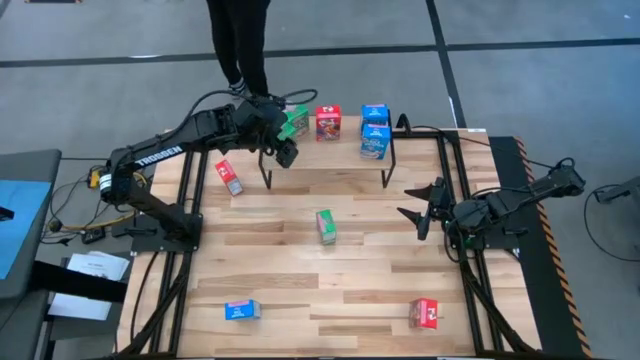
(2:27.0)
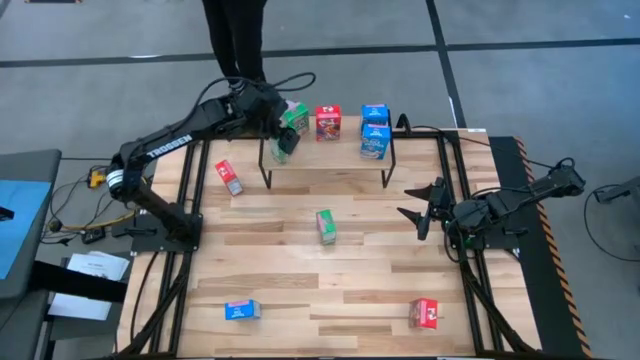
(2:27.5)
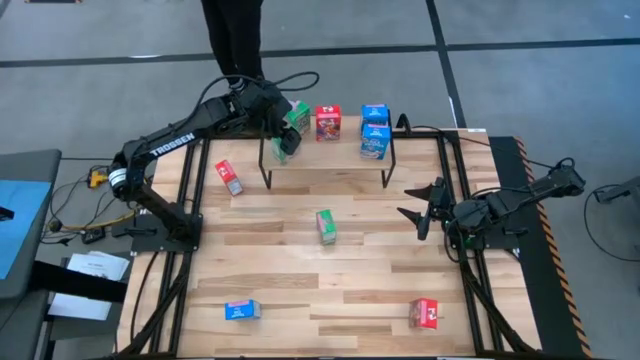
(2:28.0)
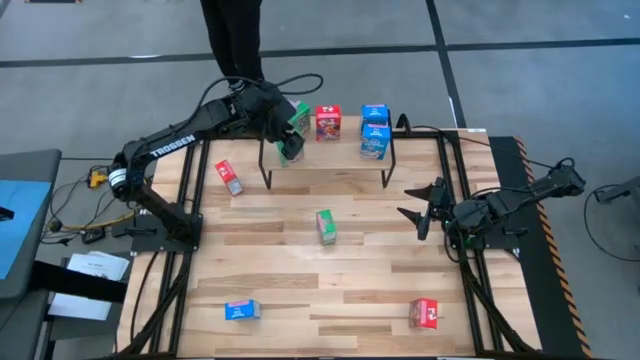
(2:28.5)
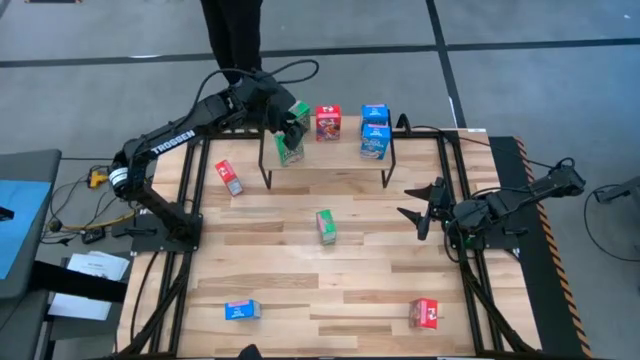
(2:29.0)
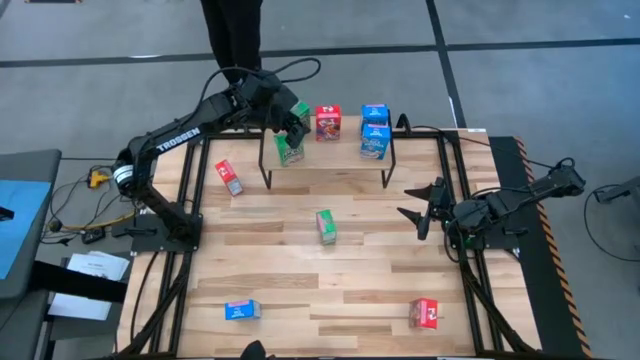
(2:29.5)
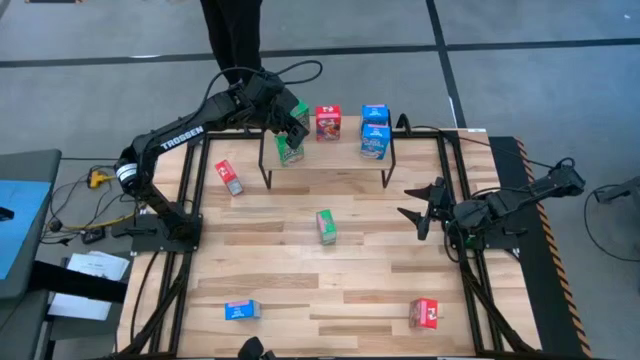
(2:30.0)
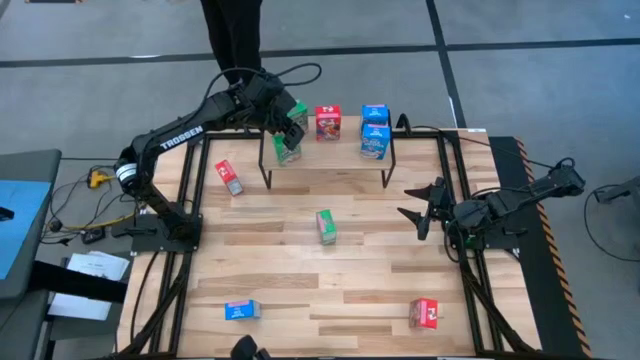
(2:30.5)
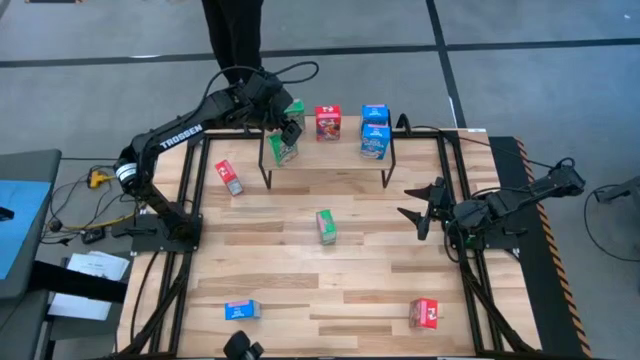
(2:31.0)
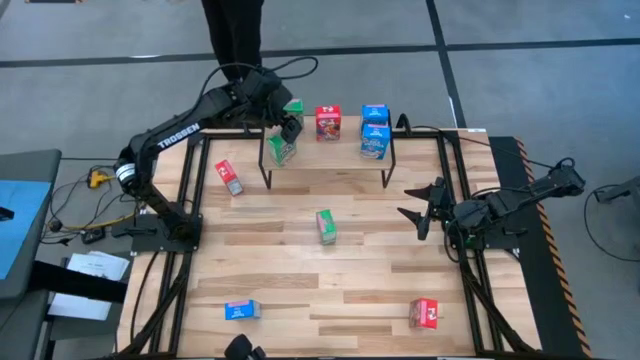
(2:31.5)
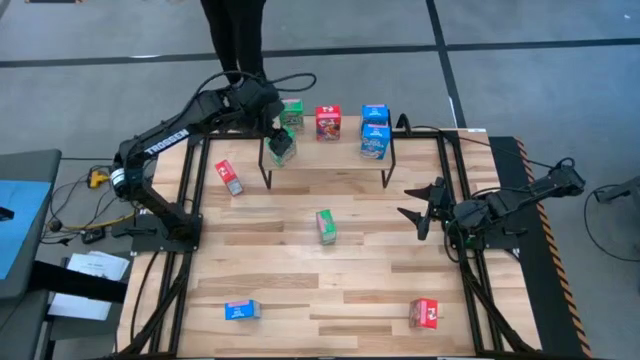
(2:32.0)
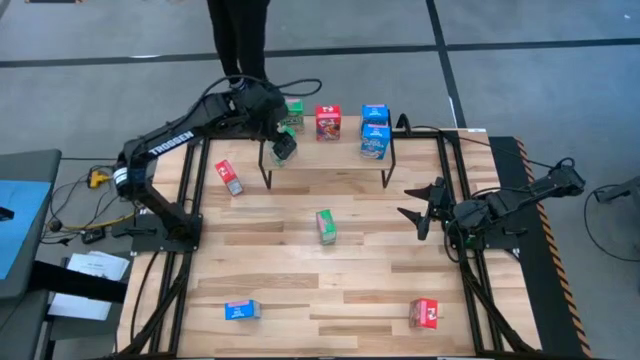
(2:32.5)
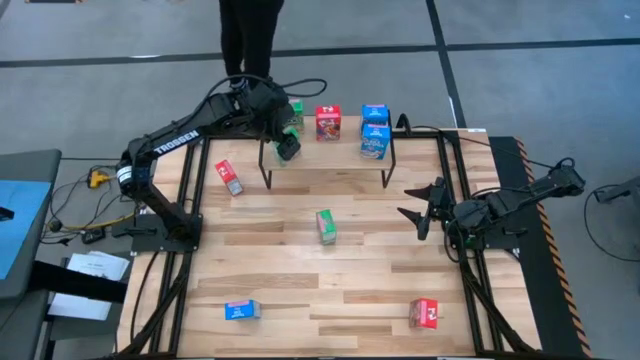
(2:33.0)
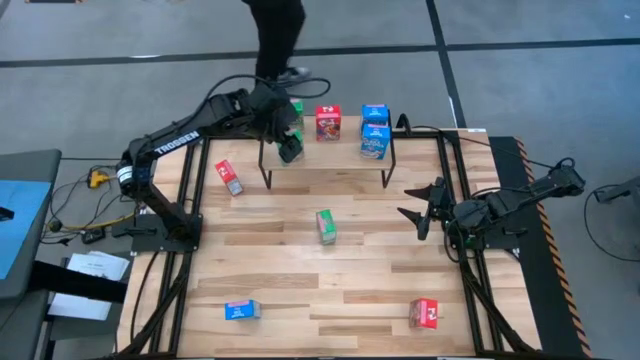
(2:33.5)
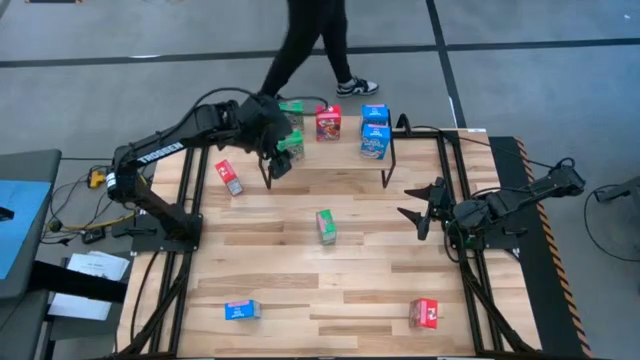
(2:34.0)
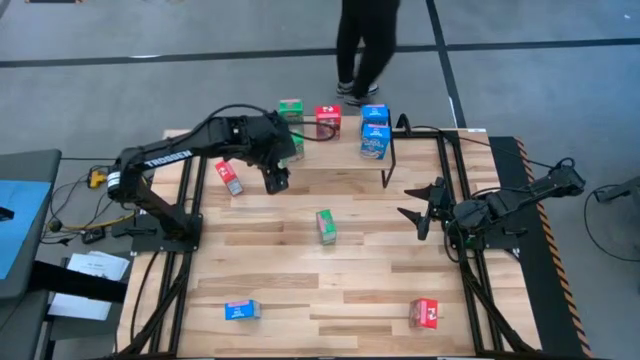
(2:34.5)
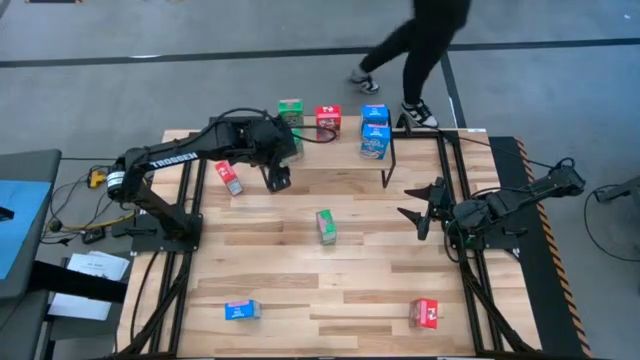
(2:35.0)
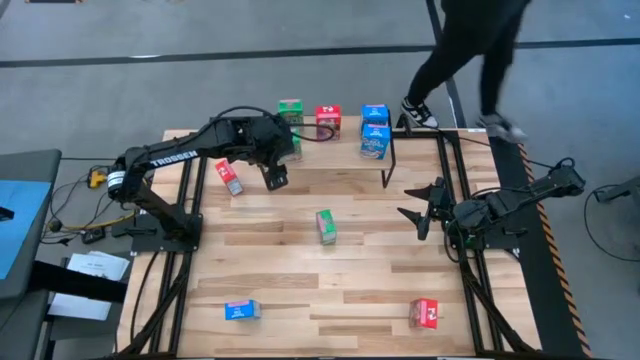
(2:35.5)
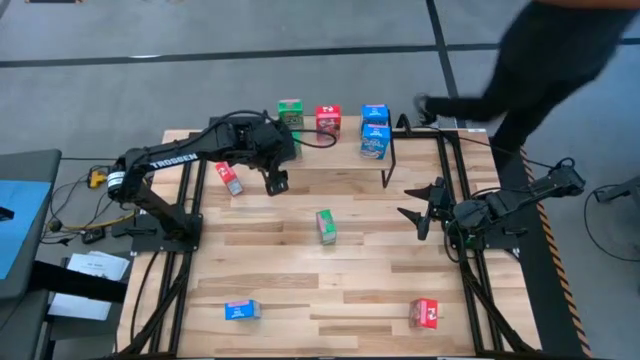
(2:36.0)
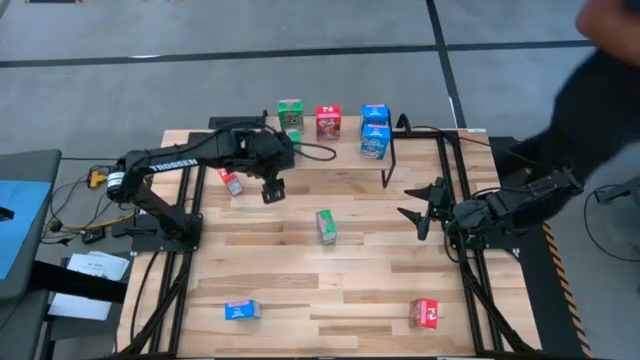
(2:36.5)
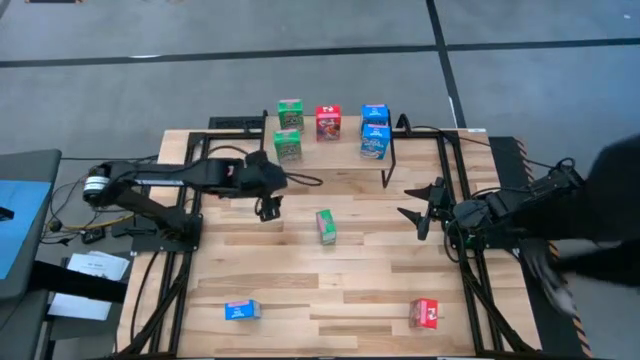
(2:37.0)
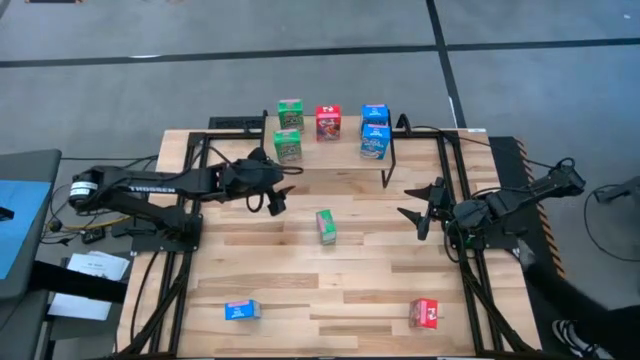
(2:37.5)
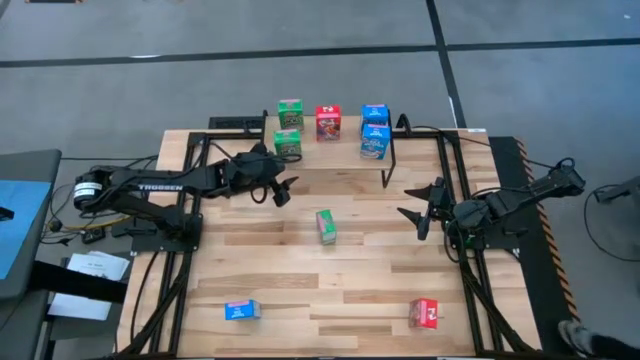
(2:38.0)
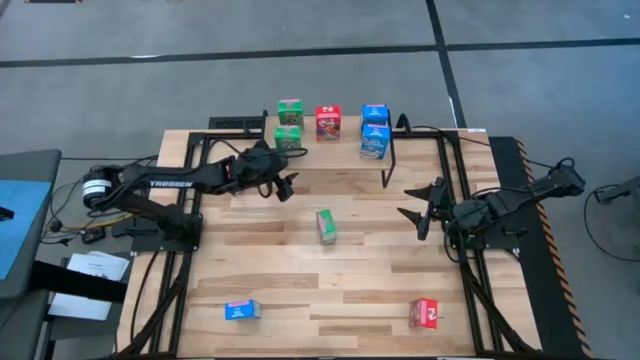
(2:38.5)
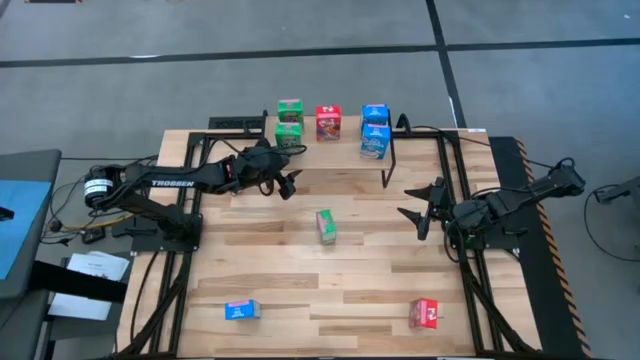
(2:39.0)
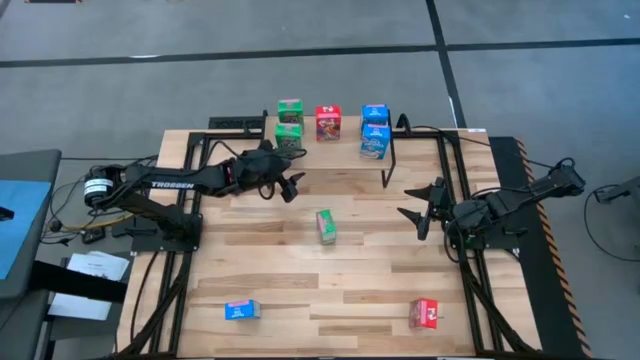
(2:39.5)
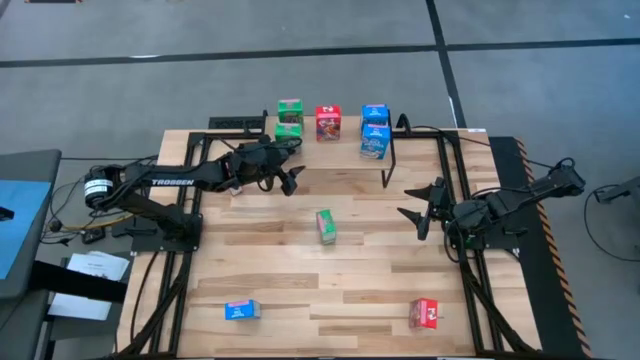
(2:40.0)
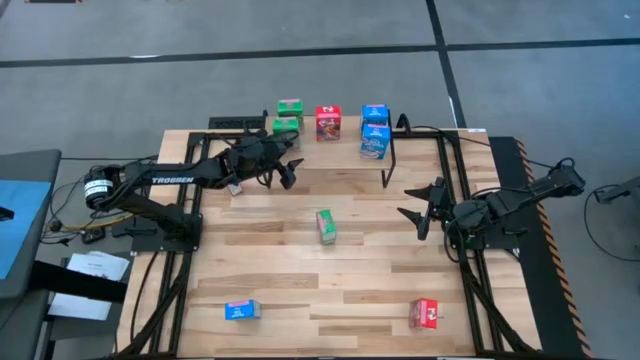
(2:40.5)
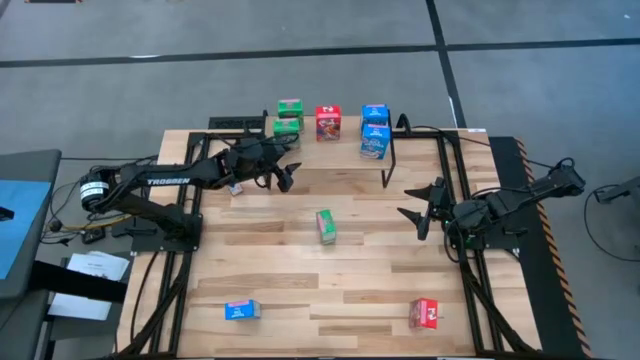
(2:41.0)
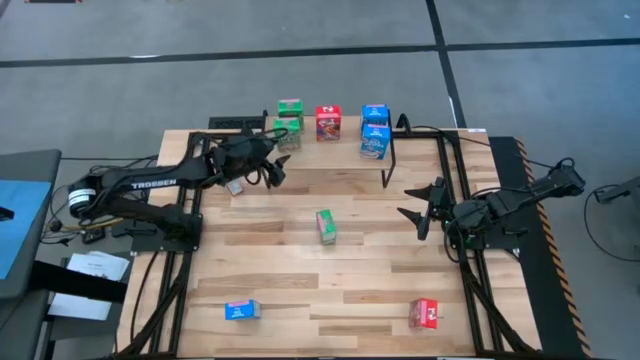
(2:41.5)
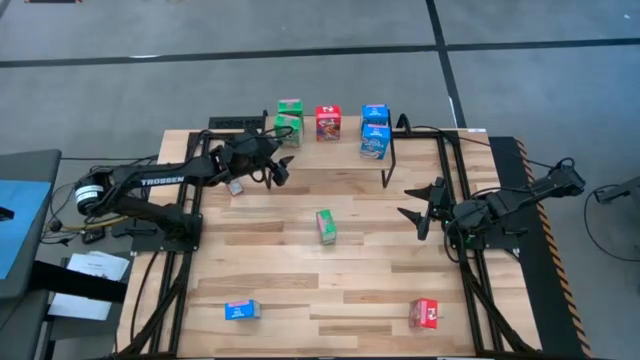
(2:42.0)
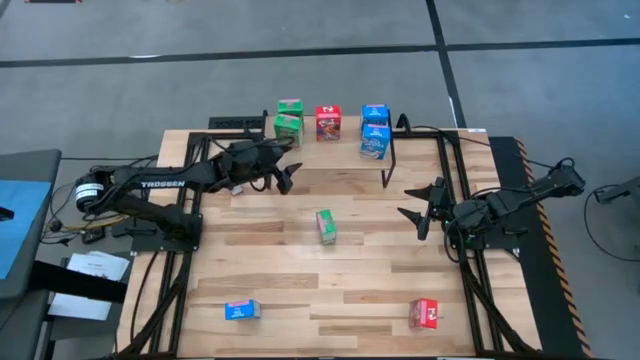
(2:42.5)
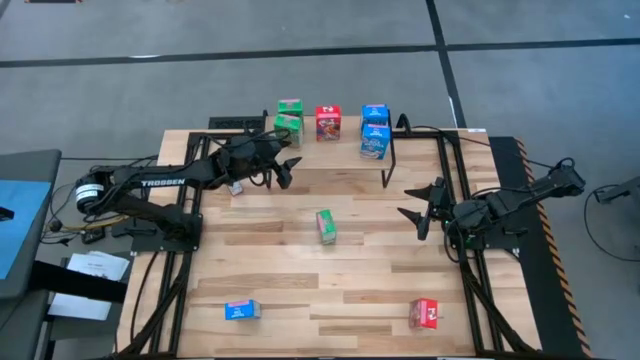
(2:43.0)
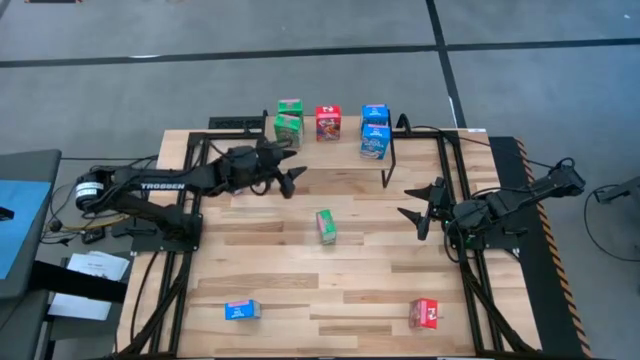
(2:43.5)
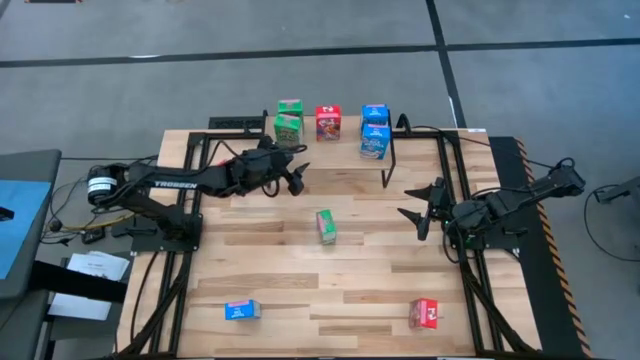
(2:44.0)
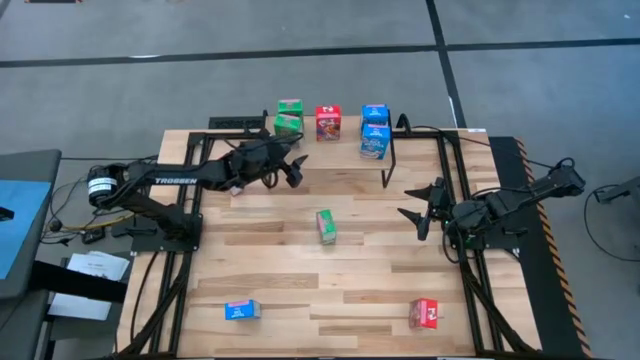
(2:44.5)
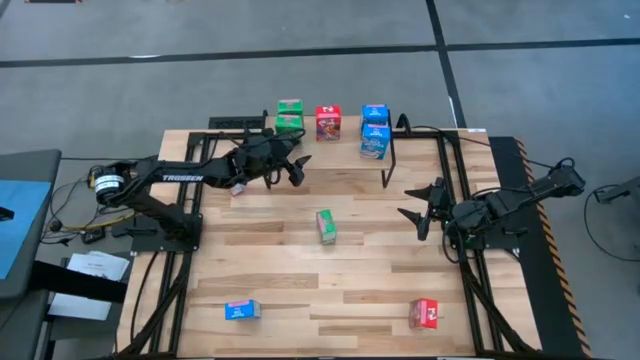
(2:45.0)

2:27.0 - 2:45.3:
Task: Stack cereal on shelf
Adjust the green cereal boxes on the shelf

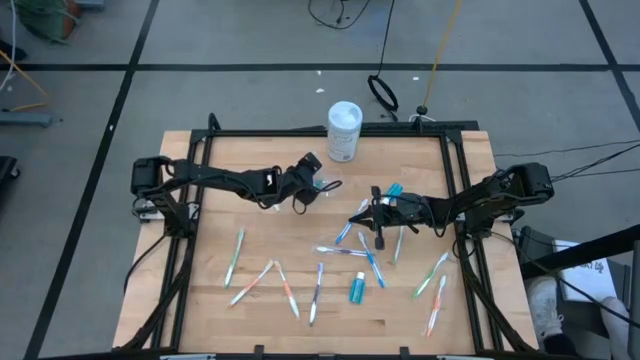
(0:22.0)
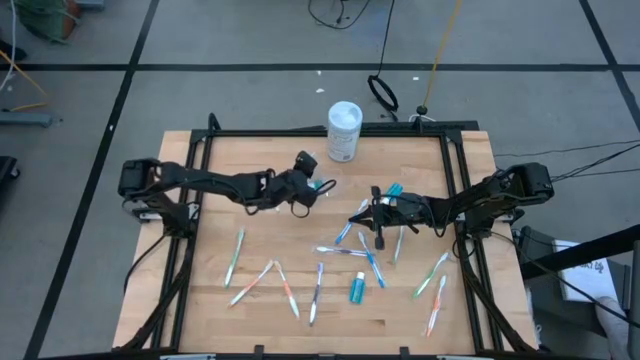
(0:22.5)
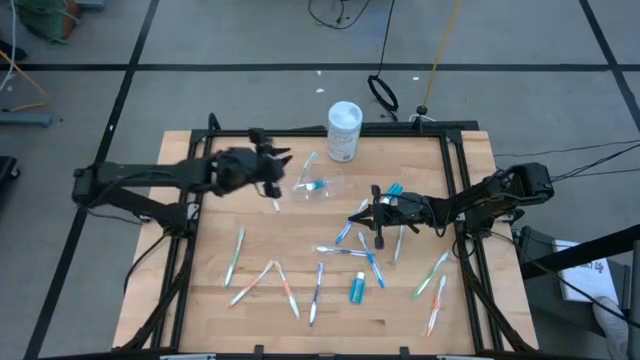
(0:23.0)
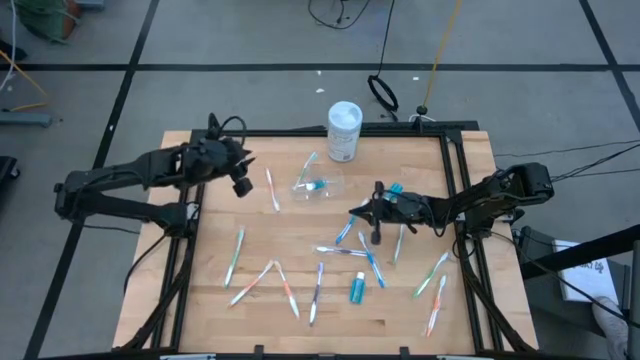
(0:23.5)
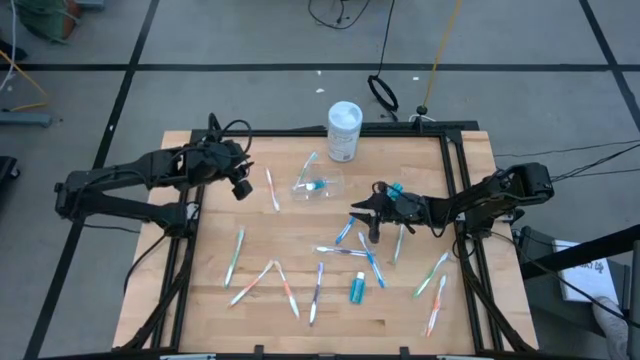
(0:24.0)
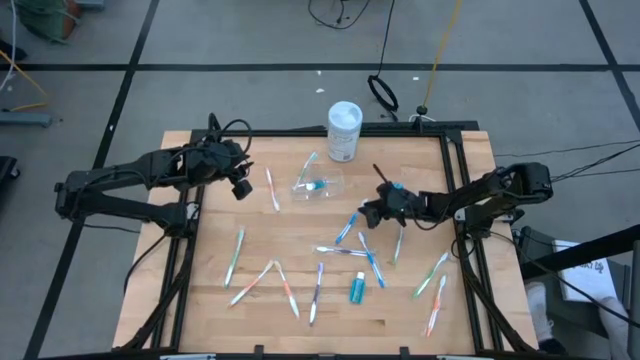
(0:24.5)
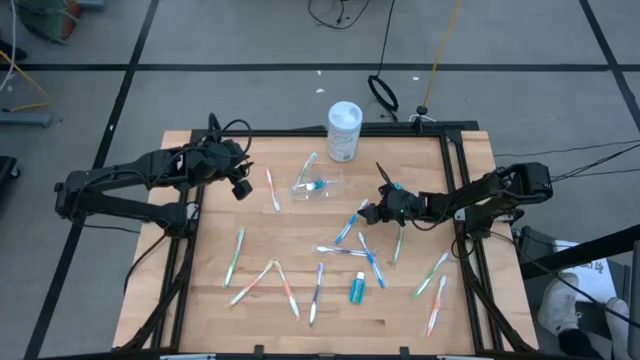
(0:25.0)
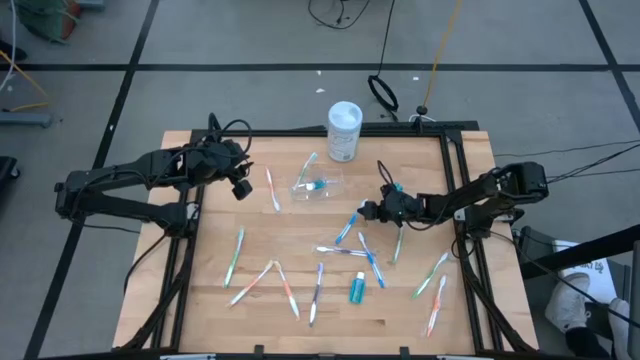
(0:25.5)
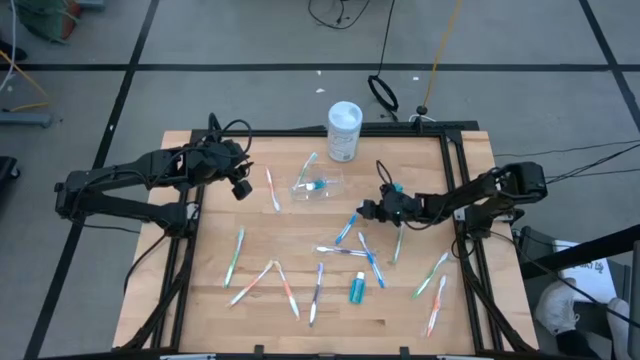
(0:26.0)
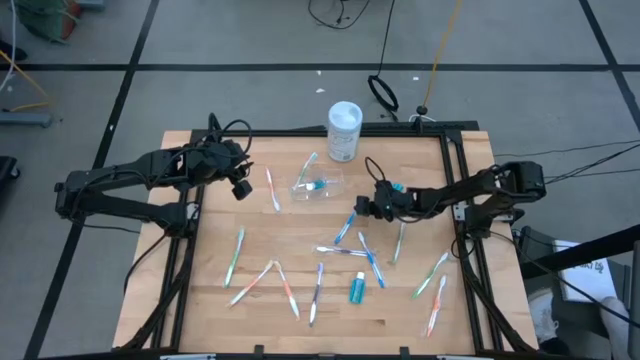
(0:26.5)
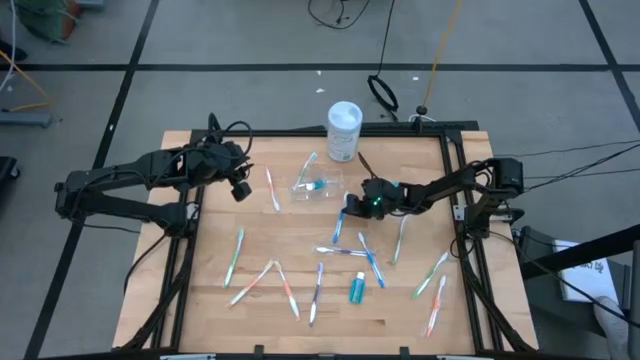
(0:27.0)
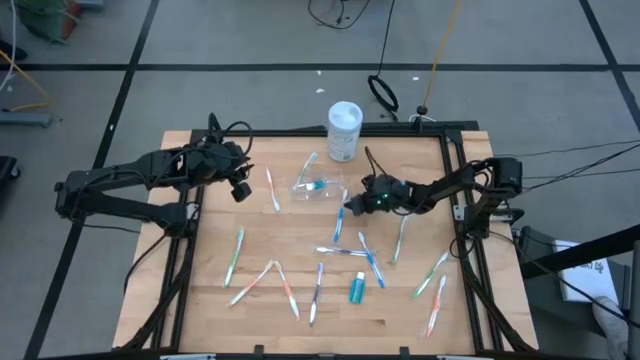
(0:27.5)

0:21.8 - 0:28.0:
Task: Pick & Place toothbrushing station
Put the blue toothbrush into the transparent organizer
